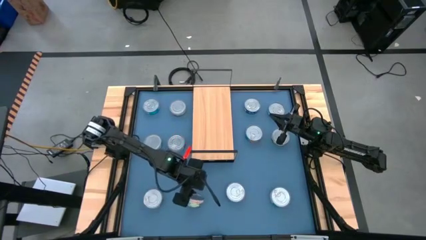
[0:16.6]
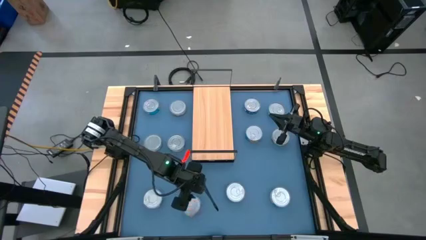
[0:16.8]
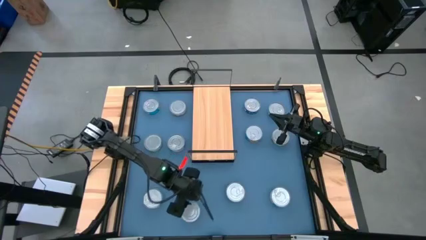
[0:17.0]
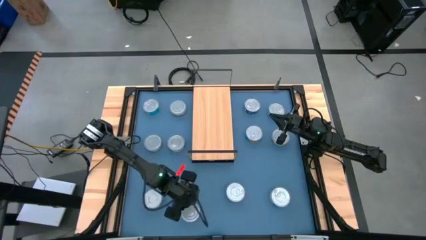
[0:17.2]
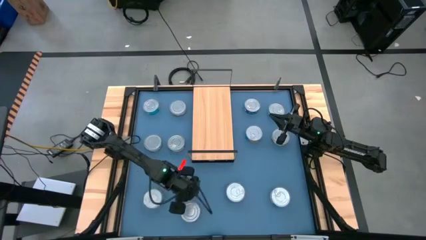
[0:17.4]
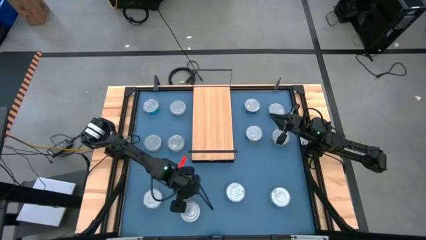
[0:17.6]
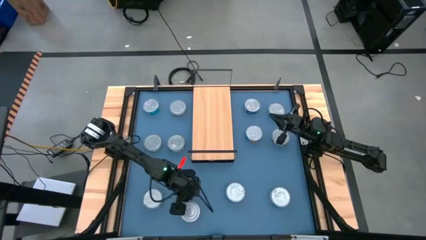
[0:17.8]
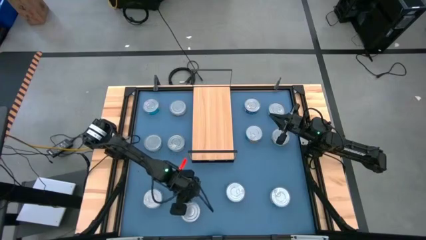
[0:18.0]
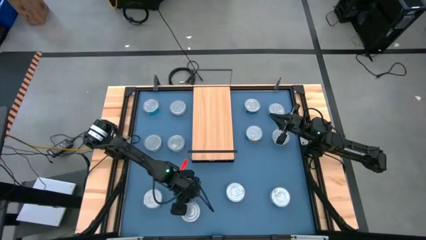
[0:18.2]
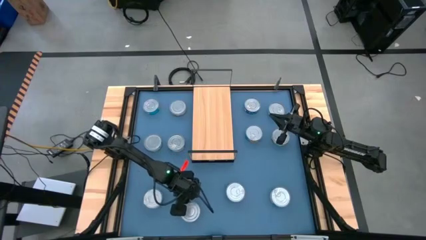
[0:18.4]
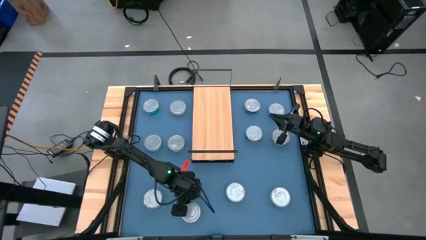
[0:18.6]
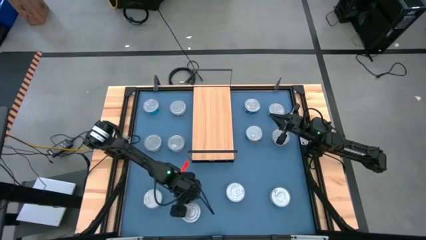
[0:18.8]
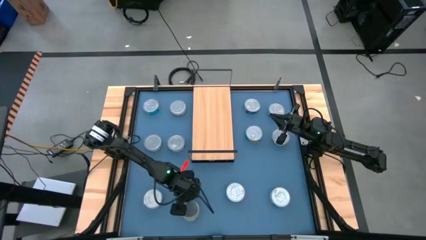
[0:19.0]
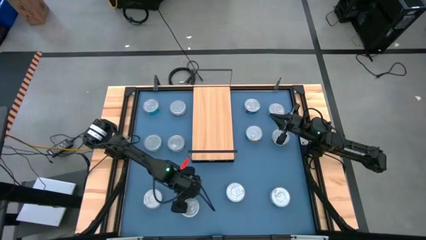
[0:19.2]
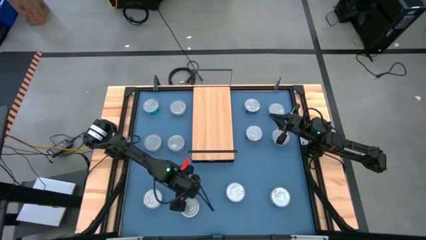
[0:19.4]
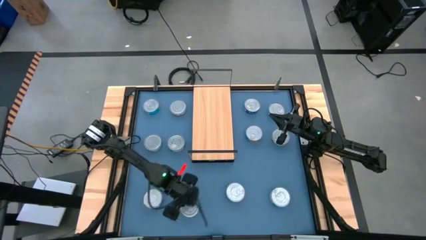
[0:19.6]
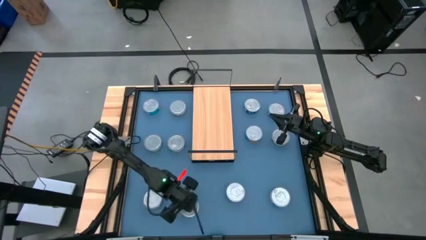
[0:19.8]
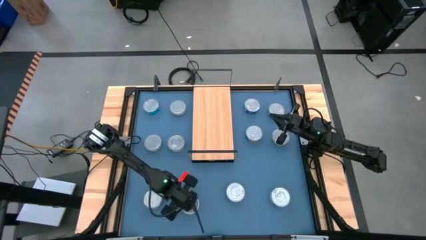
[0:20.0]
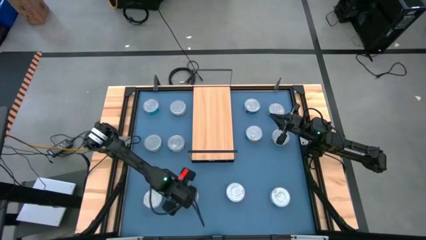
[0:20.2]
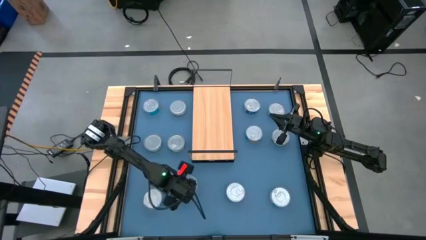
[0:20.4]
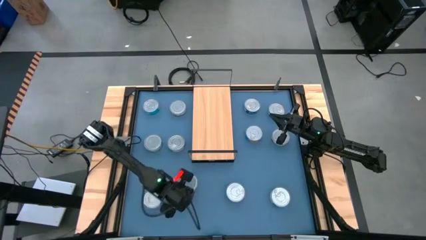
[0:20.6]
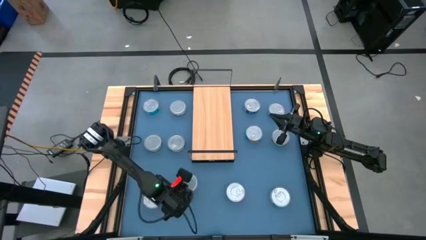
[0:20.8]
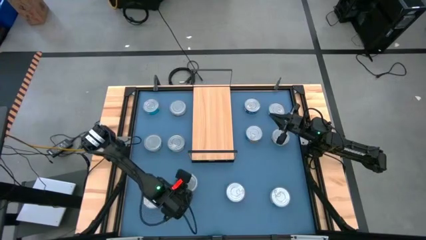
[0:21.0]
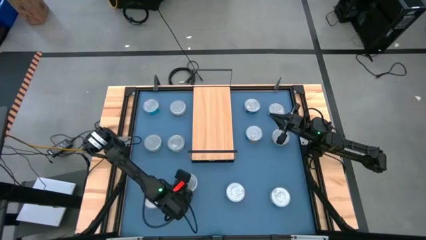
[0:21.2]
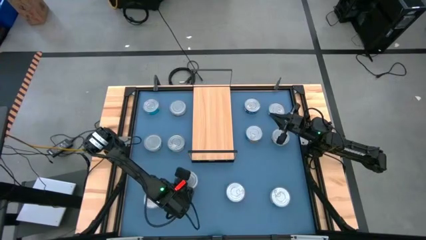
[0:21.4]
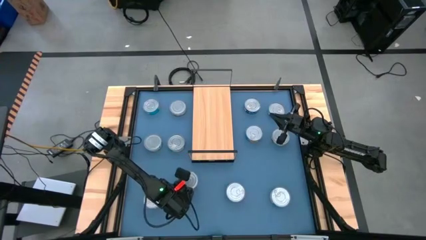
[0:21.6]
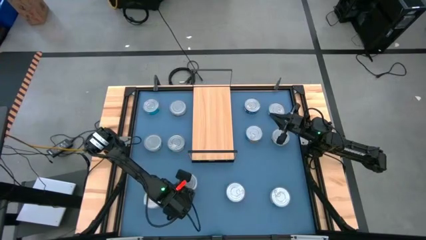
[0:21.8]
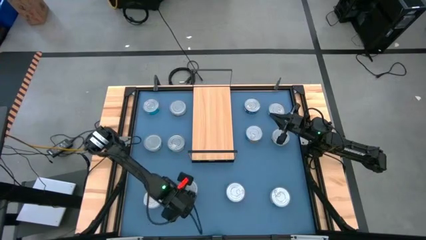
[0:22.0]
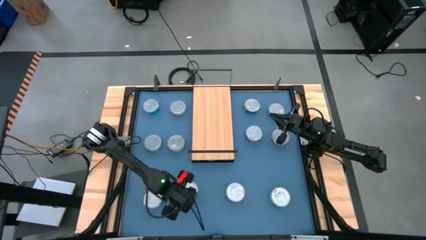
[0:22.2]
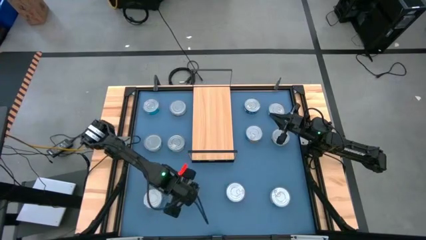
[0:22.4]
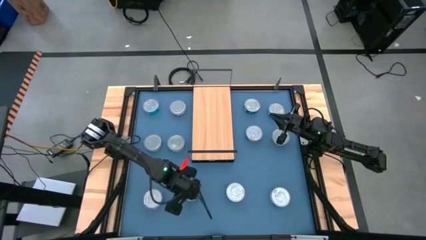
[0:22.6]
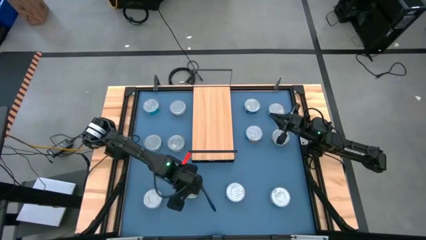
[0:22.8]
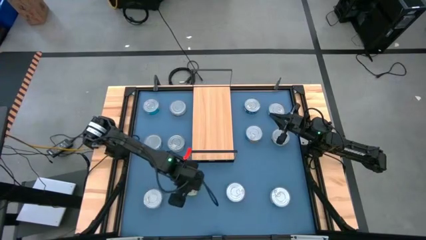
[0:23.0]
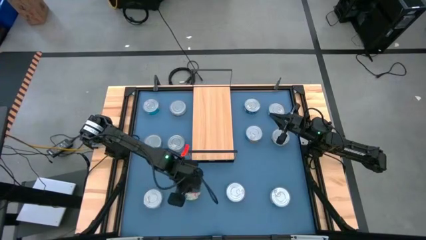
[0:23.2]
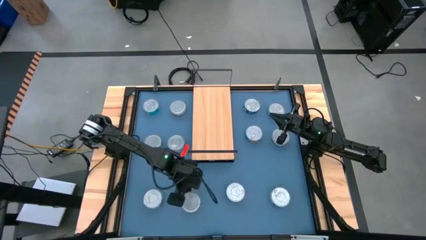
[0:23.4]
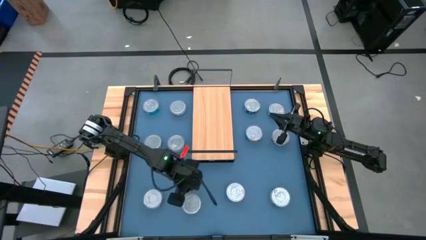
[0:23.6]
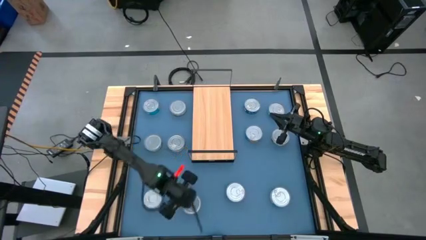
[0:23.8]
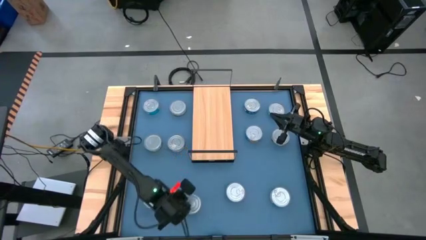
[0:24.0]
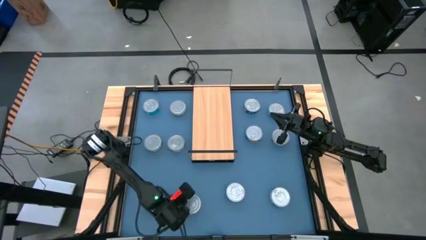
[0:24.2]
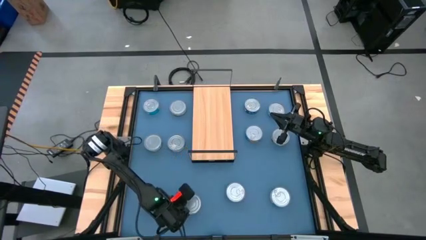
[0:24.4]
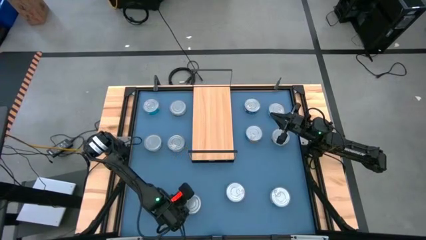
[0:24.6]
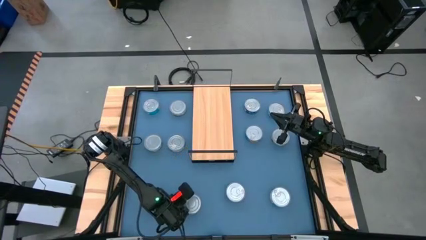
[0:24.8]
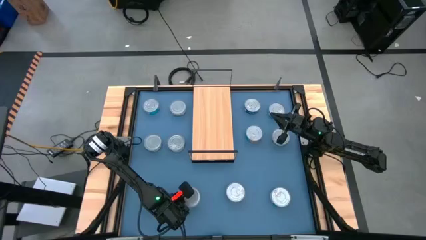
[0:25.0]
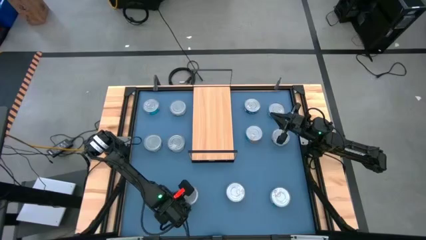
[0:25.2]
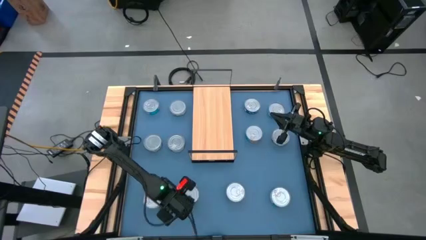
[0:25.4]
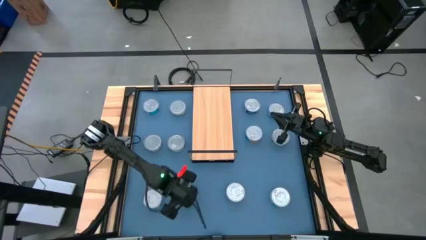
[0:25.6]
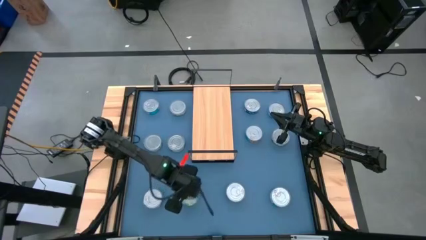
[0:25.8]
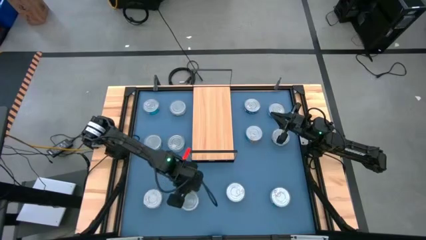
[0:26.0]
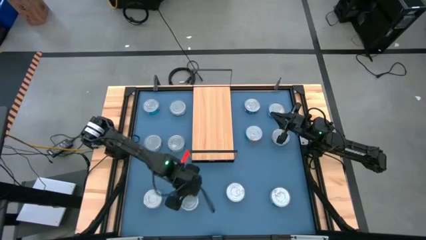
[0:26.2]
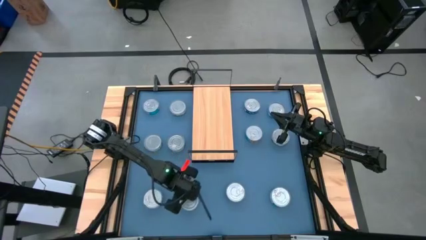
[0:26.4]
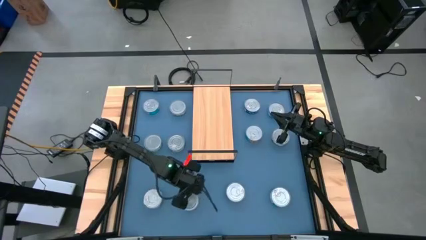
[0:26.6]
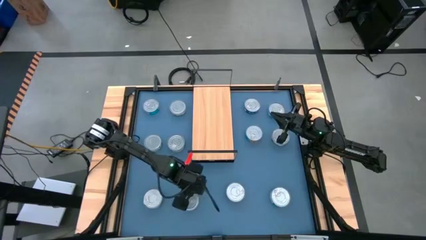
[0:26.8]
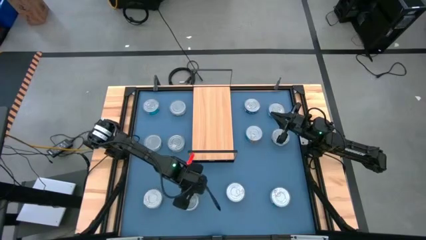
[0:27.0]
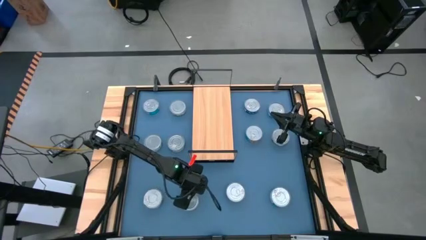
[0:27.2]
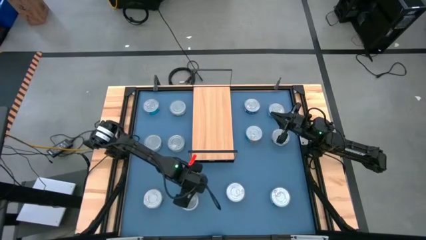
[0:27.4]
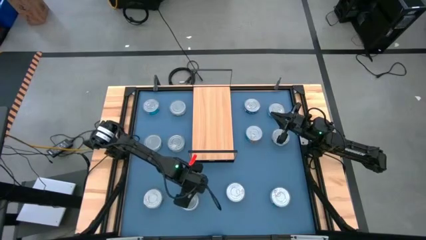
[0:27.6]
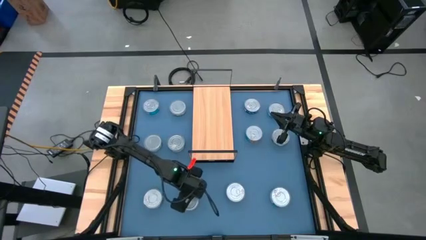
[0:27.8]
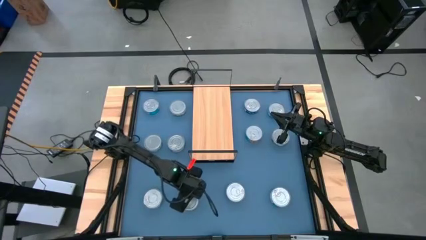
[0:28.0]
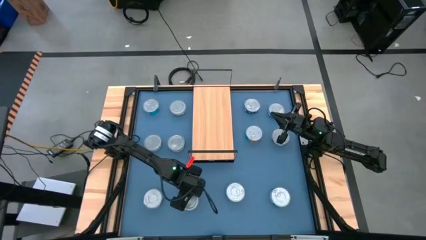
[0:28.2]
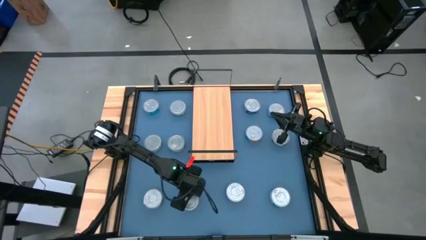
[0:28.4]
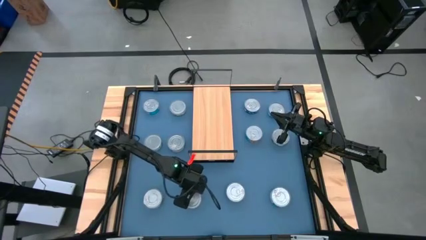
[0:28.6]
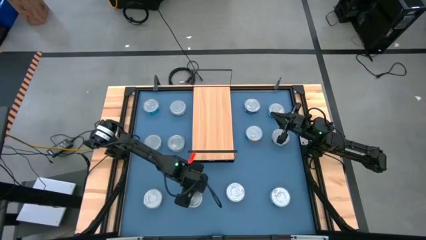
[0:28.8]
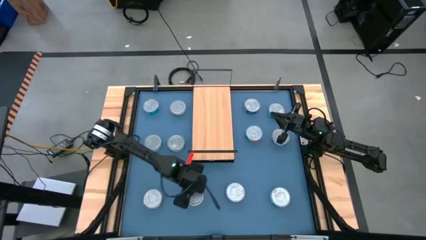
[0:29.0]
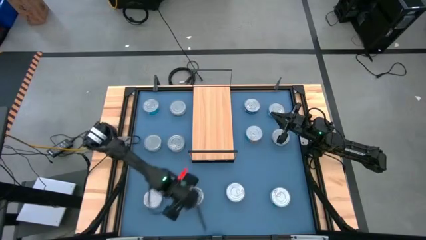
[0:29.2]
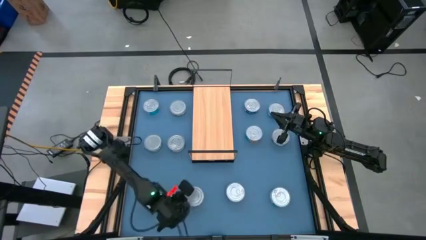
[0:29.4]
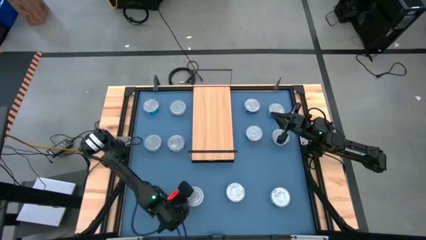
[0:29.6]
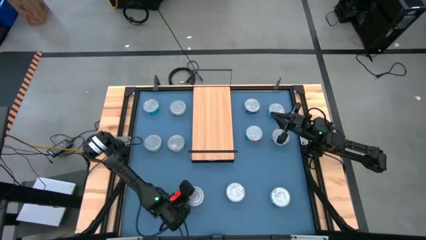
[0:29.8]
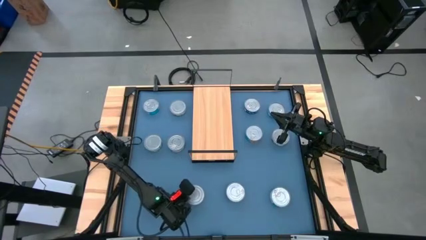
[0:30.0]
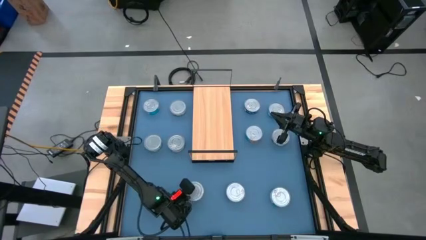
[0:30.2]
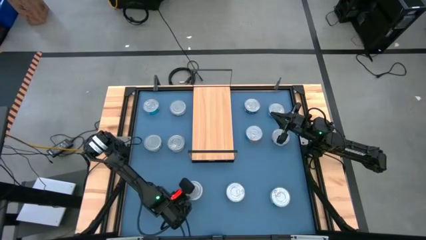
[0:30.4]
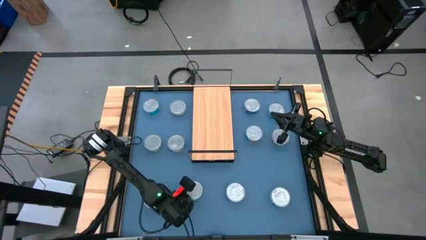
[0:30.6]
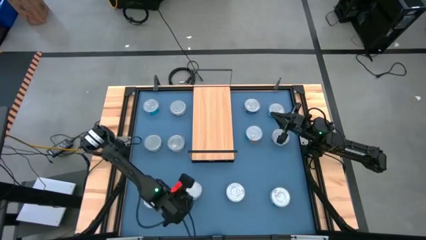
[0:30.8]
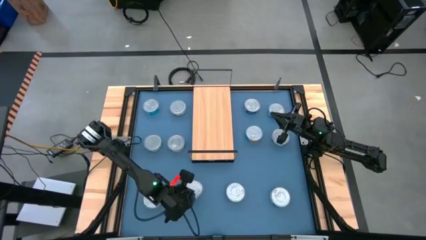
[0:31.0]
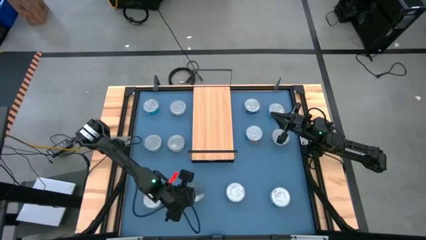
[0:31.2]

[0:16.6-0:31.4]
Task: Stack canned seafood by type on shelf
Put the green tuna can on the shelf
